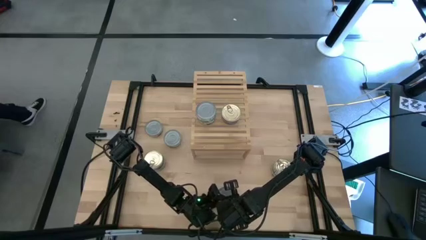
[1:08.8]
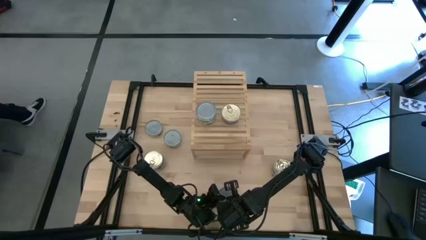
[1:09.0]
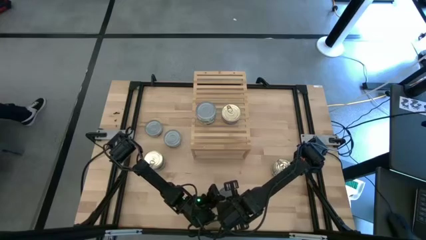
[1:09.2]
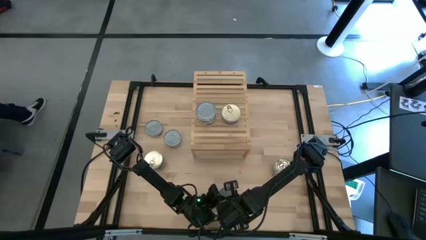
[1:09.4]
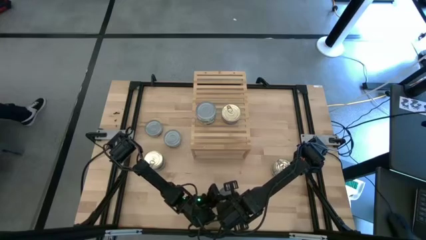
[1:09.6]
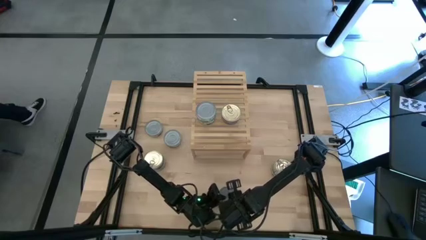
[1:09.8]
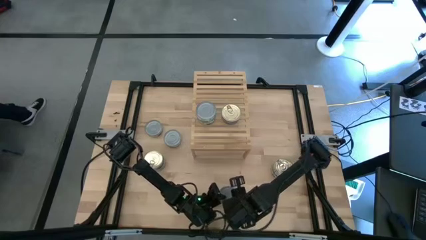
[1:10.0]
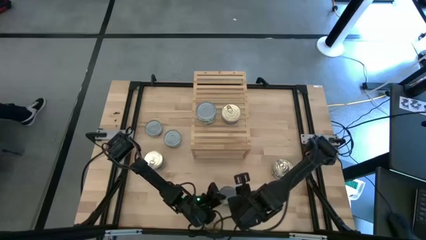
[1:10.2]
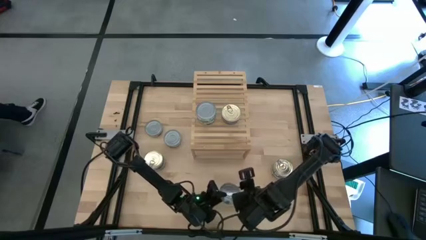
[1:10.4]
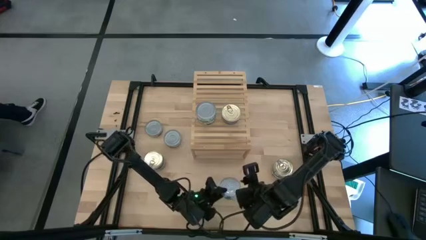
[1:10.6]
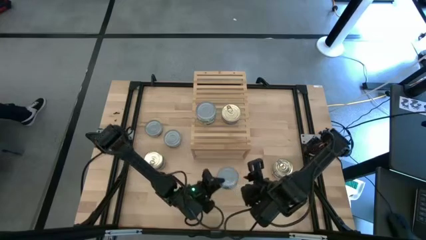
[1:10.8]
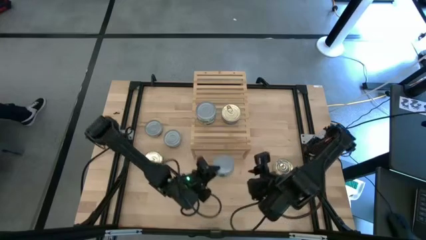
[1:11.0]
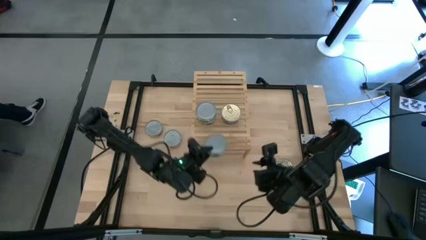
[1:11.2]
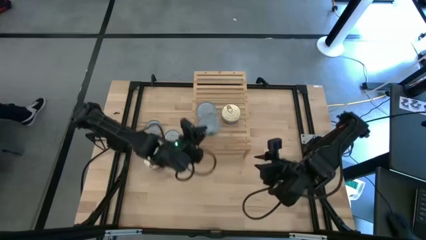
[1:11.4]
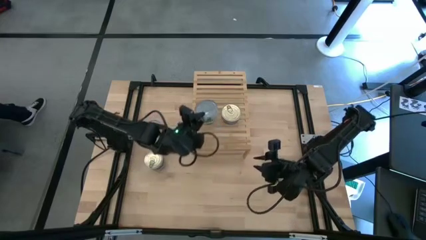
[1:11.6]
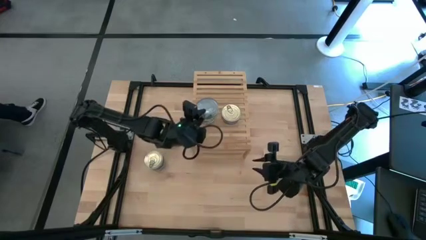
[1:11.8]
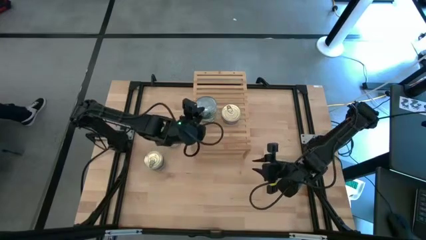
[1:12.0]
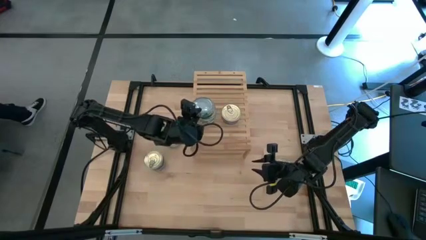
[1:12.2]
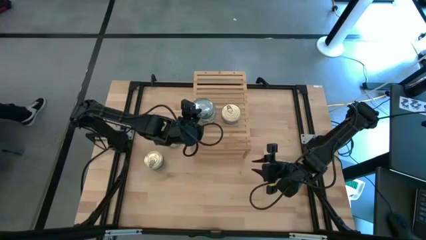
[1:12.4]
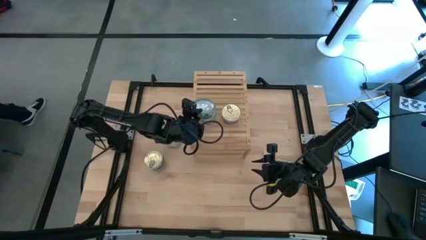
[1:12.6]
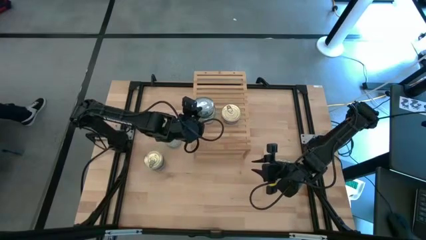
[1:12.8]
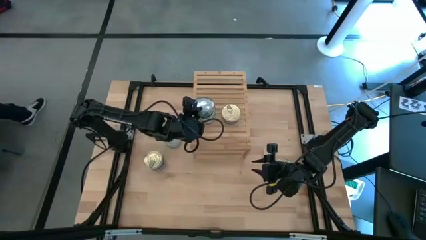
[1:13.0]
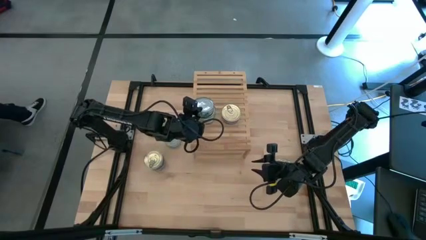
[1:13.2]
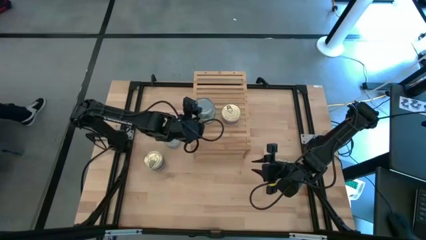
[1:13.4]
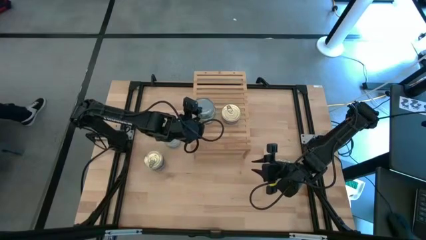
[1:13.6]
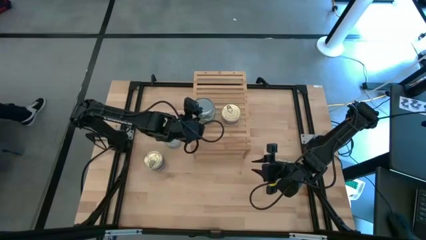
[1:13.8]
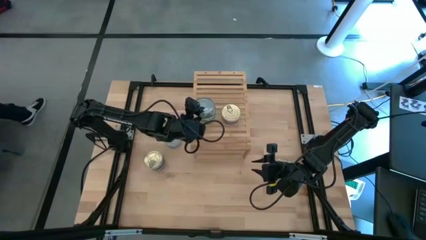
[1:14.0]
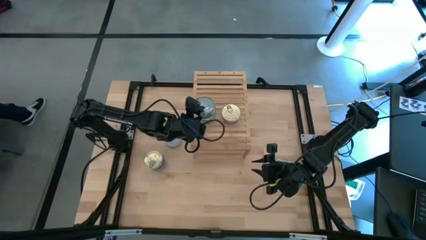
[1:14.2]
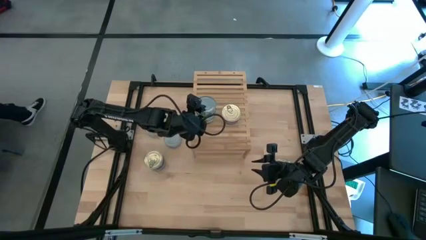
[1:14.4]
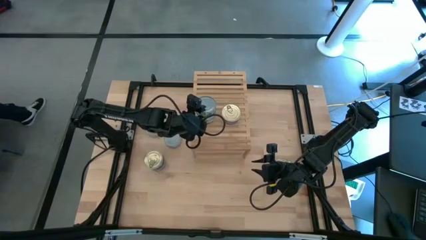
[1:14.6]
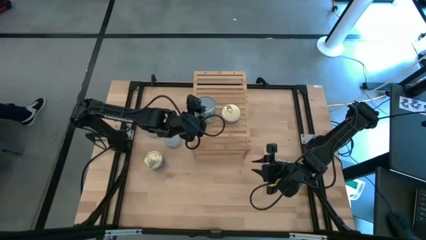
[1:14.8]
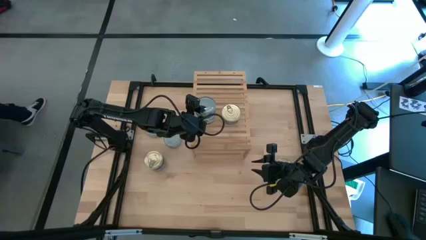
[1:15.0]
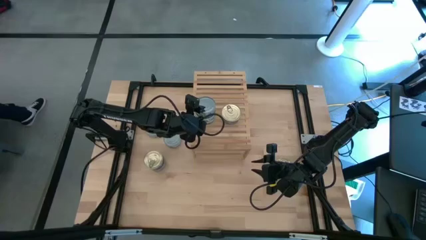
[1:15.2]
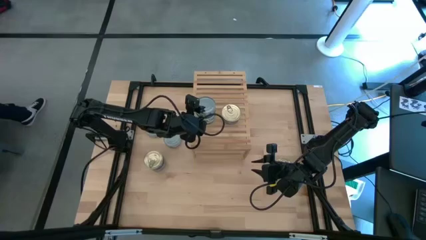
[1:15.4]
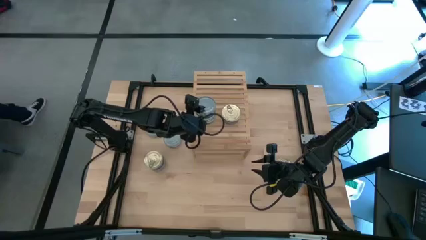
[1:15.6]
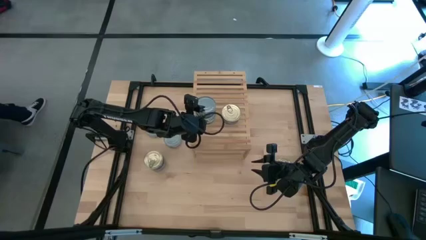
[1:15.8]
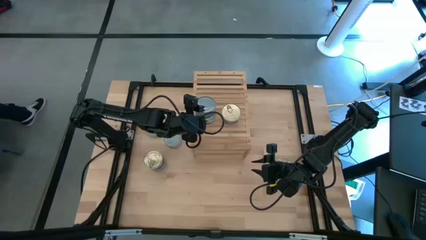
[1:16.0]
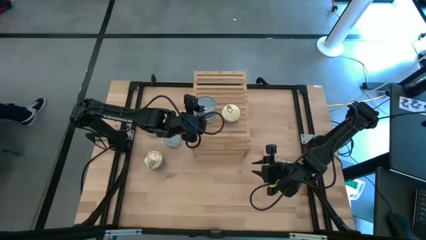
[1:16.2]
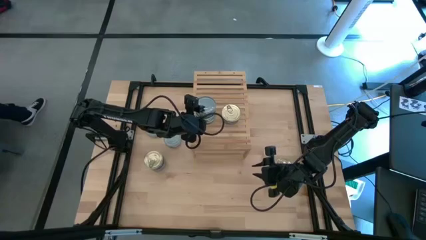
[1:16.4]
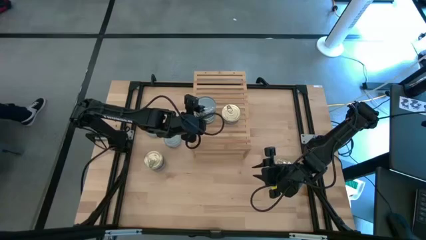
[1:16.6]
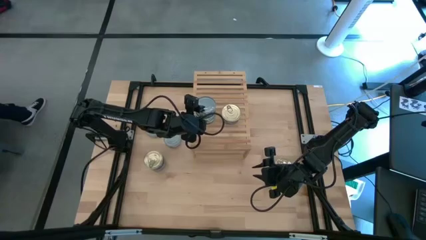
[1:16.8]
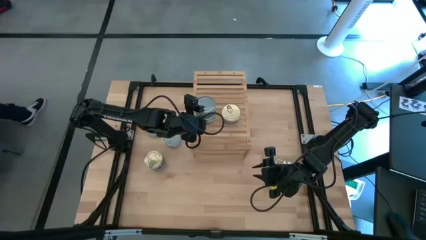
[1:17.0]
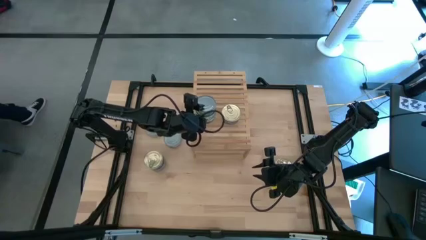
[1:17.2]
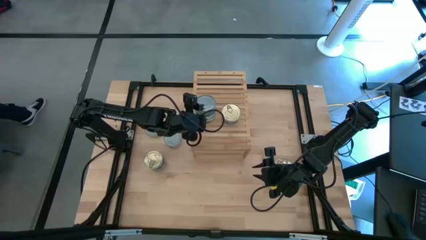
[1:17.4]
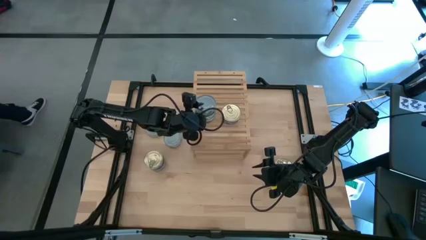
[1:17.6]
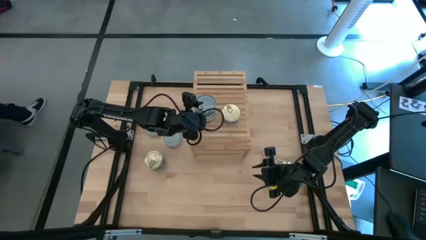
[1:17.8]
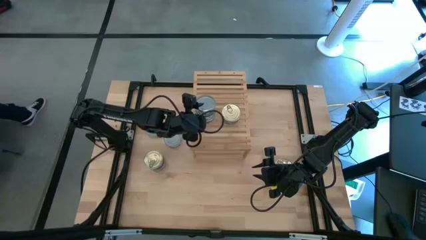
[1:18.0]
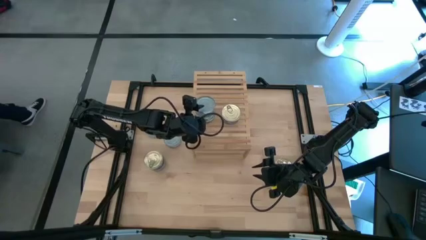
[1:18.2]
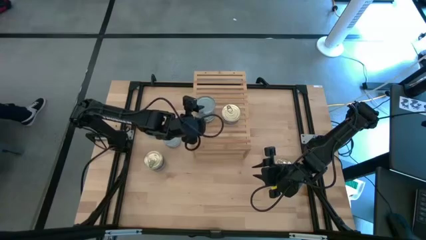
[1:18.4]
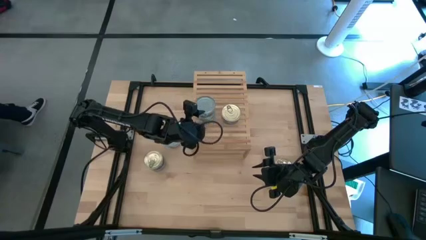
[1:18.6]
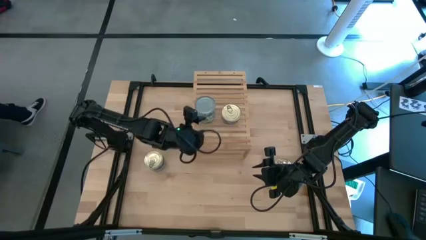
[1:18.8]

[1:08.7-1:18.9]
Task: Stack canned seafood by type on shelf
Stack the green tuna can on top of the green tuna can on the shelf

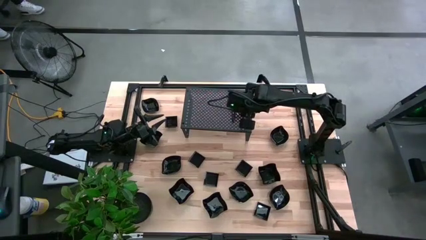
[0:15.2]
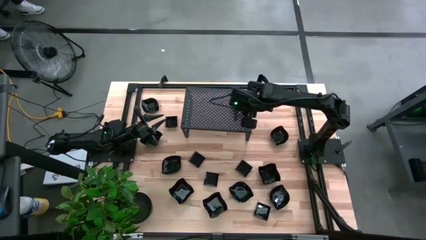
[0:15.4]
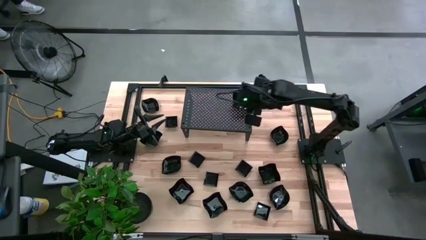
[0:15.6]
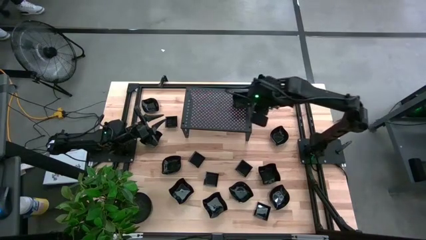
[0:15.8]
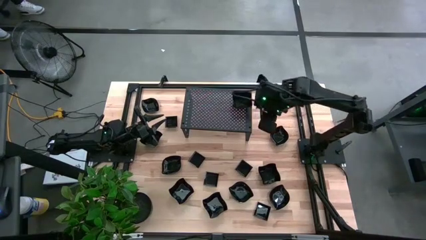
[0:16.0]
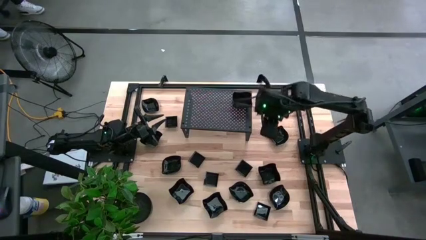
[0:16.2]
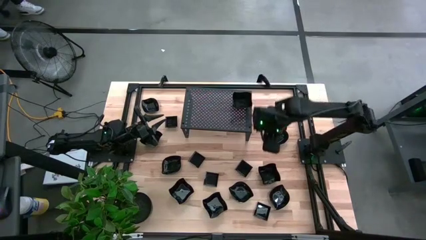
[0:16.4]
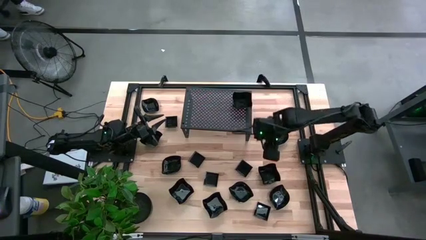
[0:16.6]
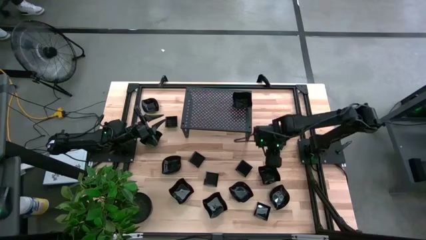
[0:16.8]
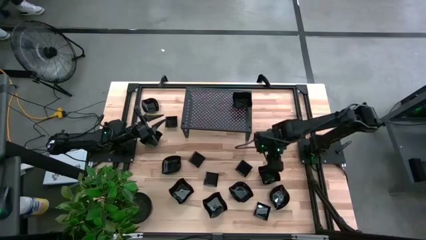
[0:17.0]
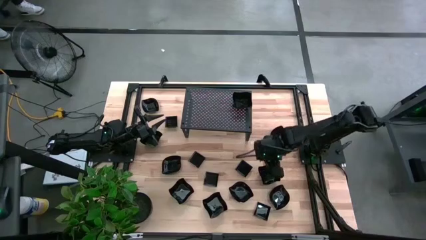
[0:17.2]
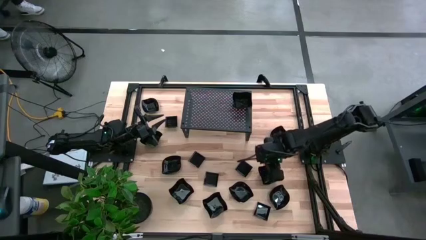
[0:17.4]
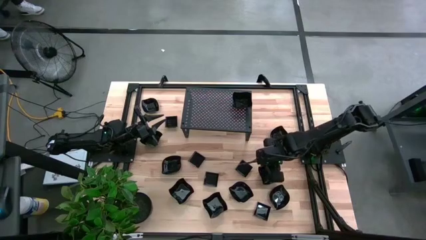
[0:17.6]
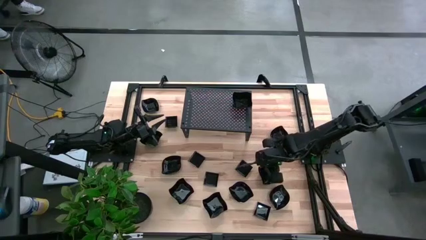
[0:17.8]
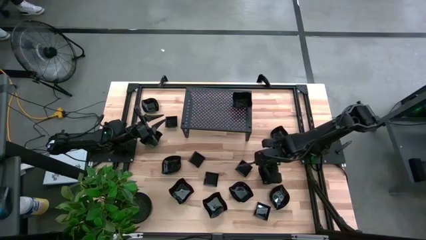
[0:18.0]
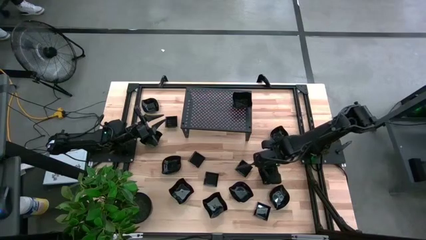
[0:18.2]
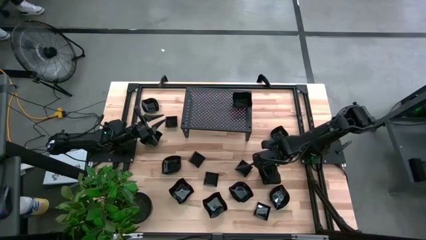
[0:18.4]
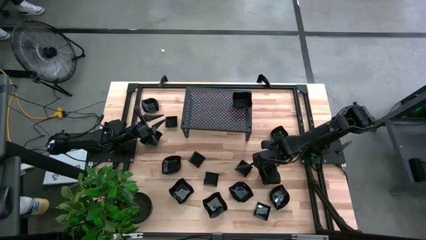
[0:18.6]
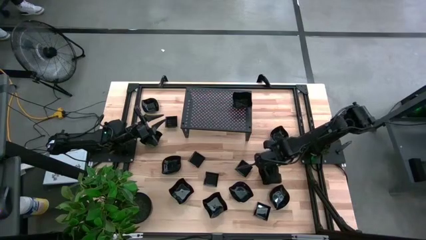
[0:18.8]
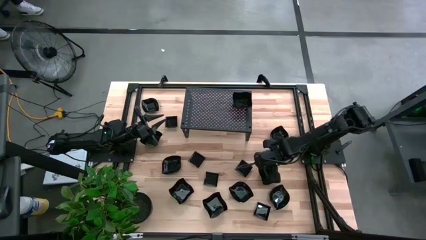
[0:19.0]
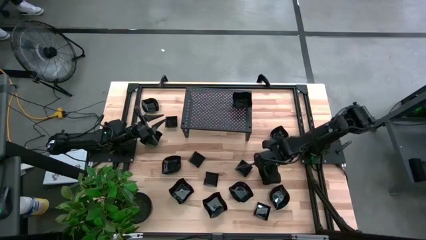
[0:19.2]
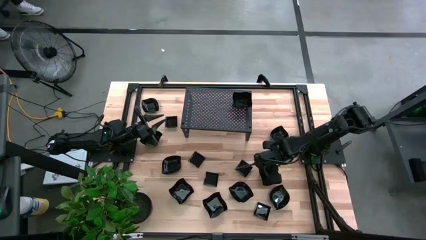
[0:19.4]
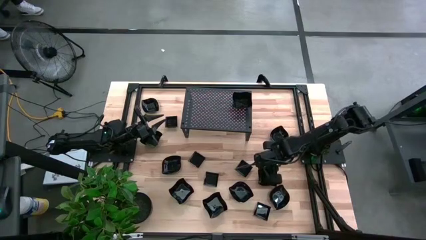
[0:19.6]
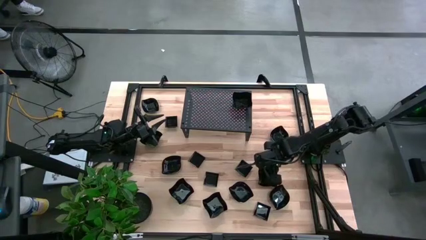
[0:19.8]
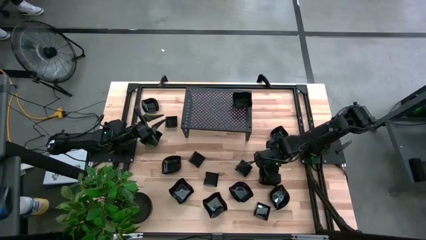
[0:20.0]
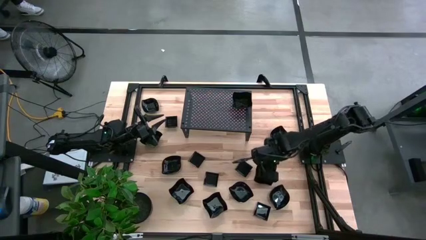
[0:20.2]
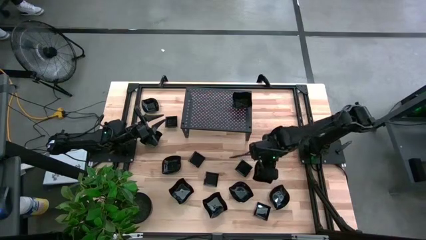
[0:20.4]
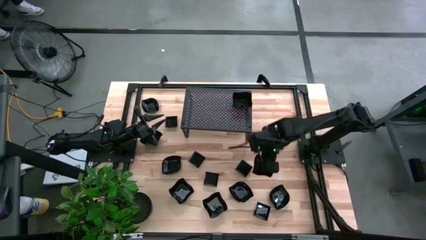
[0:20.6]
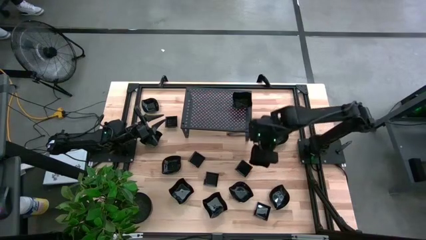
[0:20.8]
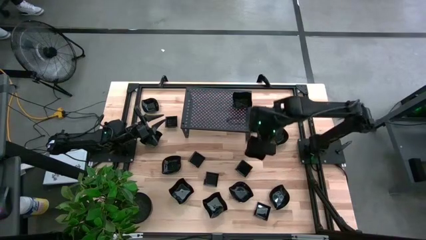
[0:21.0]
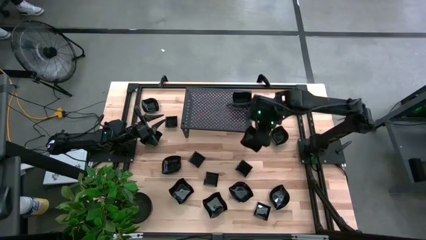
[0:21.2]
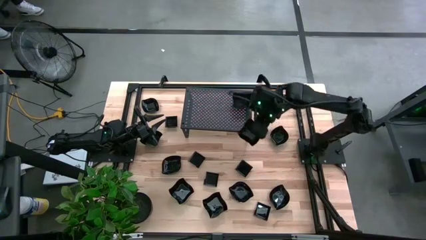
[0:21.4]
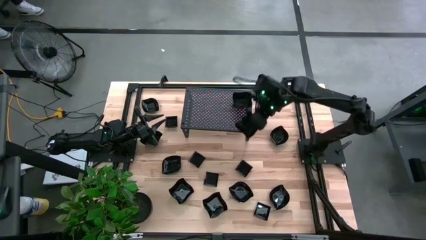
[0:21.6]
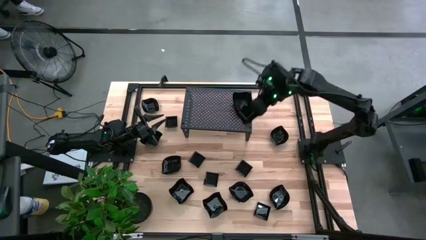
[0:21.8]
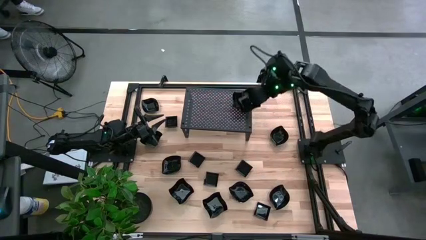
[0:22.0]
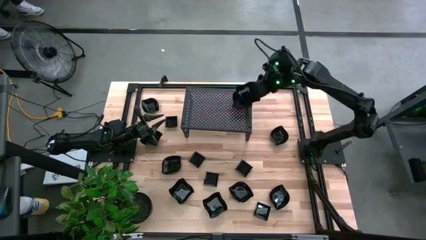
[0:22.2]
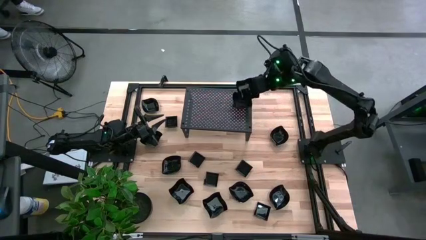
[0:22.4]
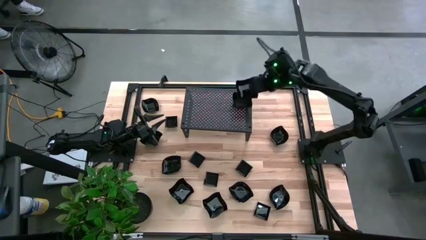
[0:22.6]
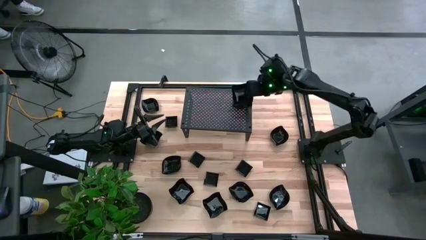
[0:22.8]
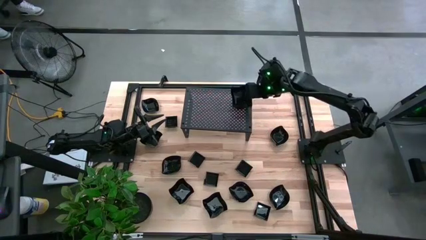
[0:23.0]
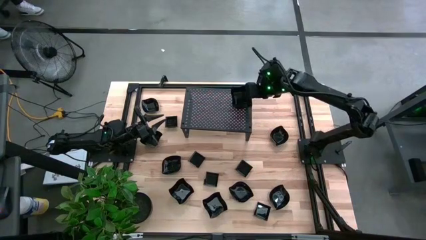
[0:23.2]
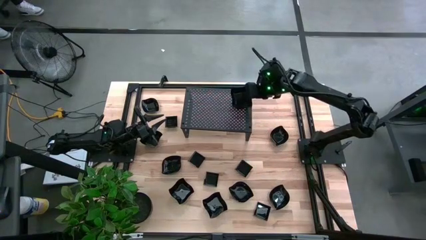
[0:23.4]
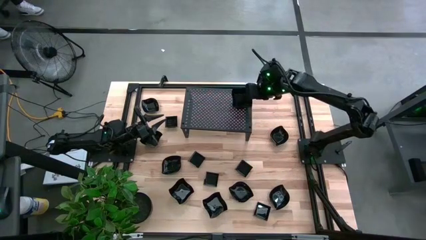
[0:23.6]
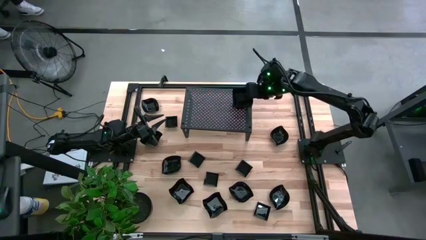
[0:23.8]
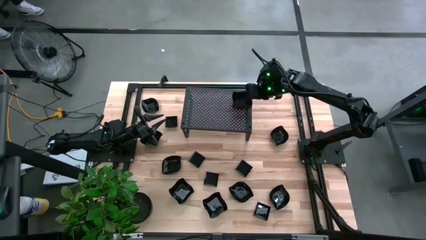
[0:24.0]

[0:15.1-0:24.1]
Task: Pick & Place Mini shaped plates
Stack the distorted square plate on the distorted square plate on the shelf
